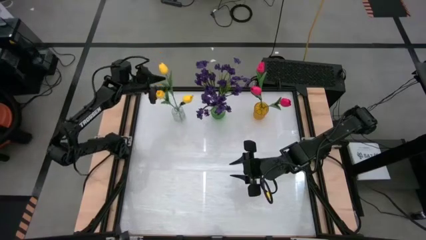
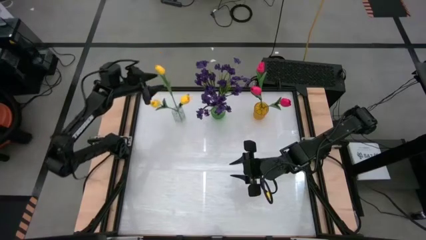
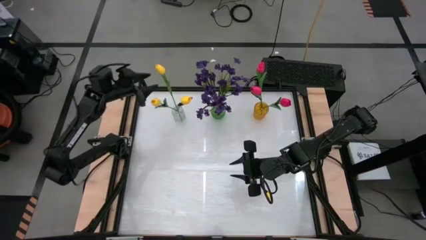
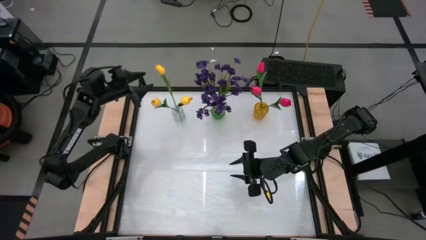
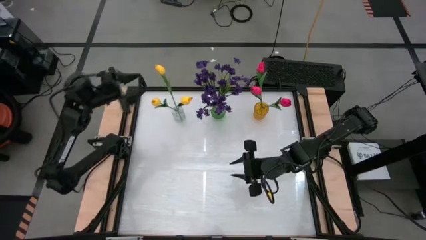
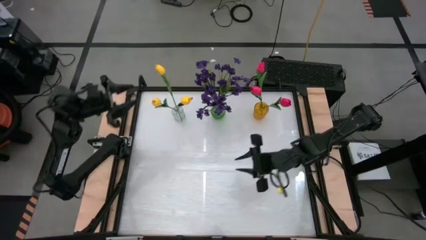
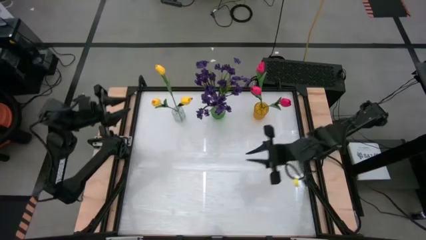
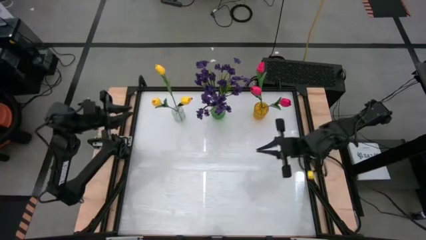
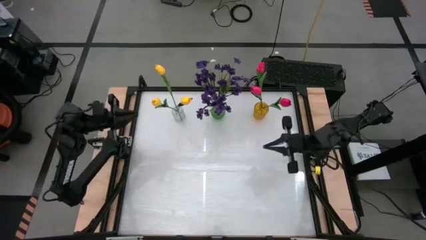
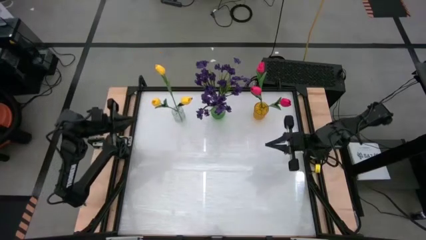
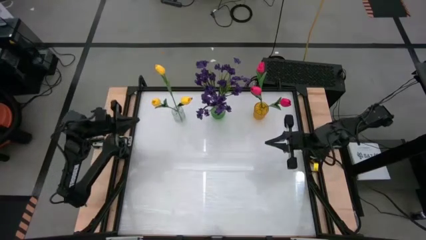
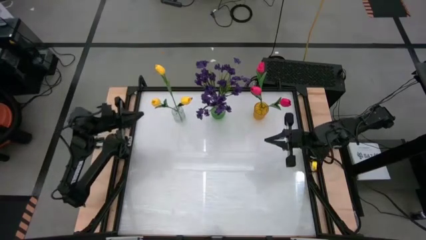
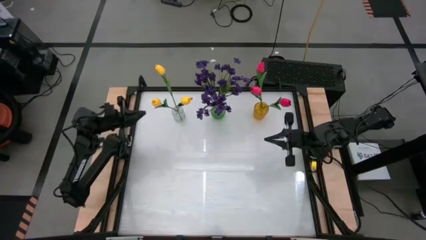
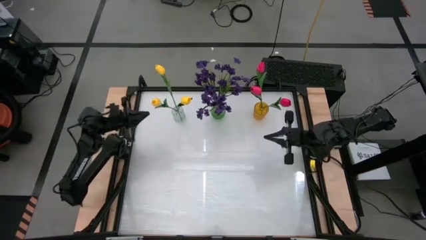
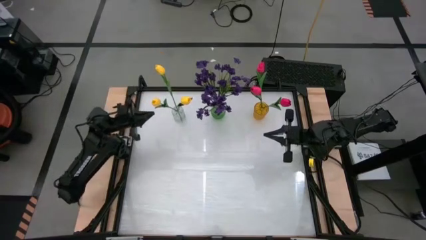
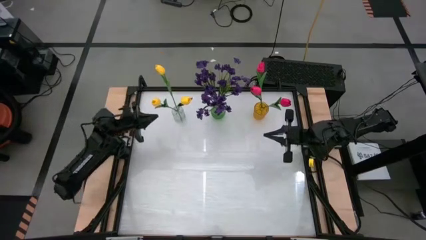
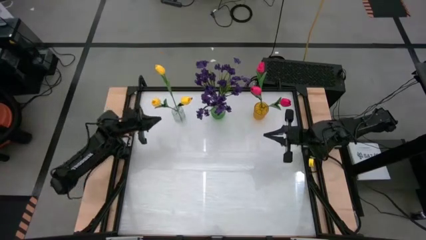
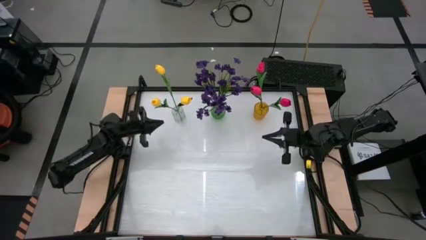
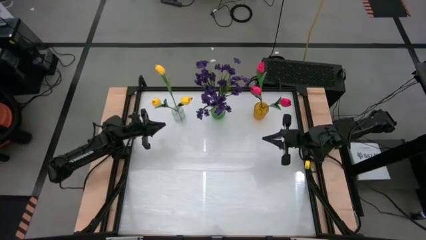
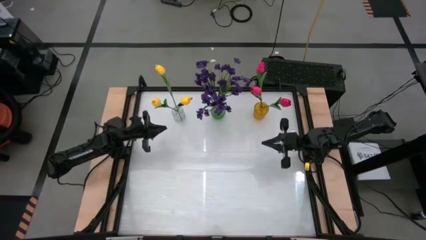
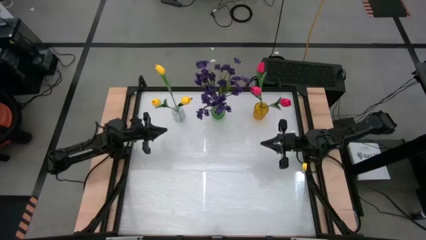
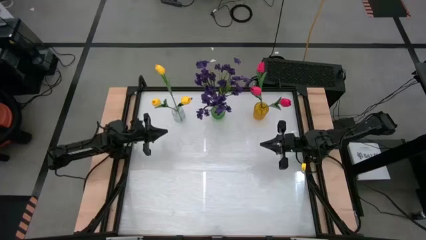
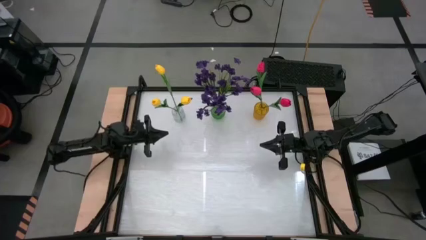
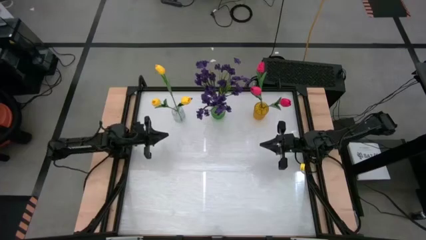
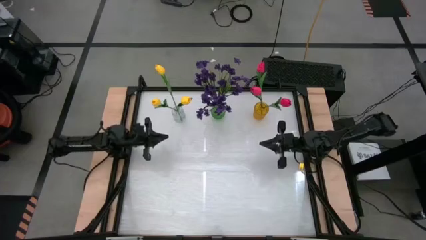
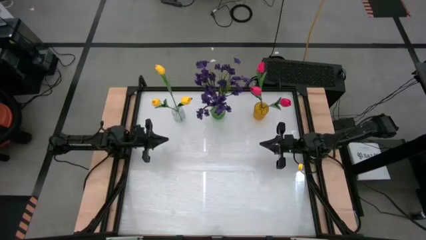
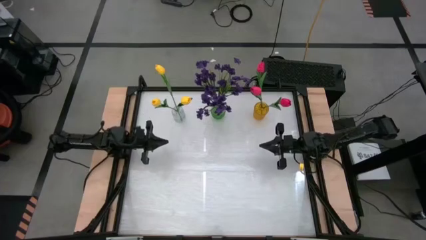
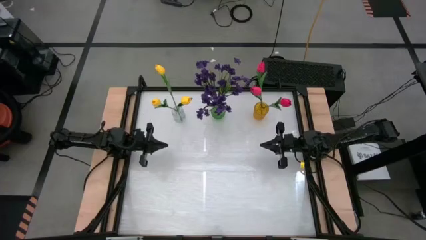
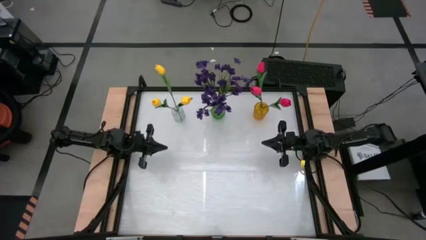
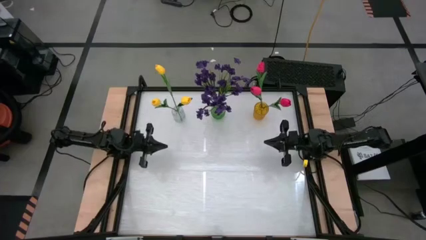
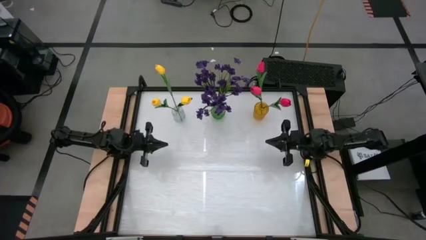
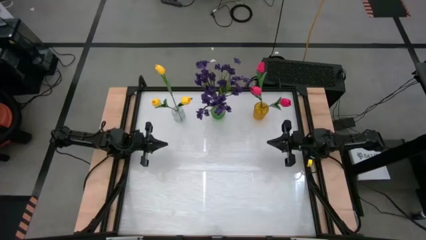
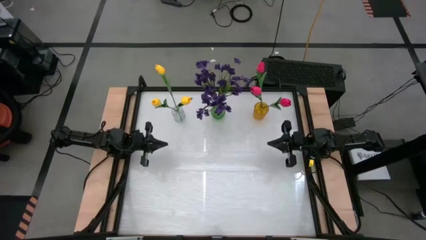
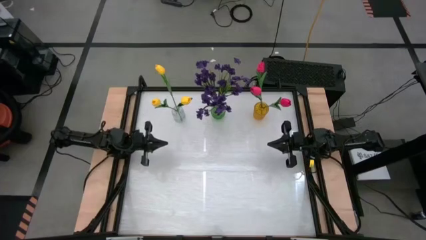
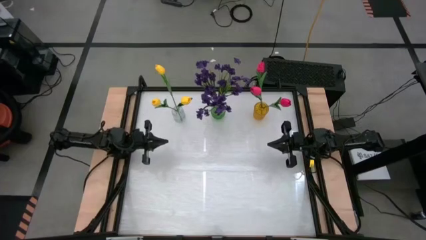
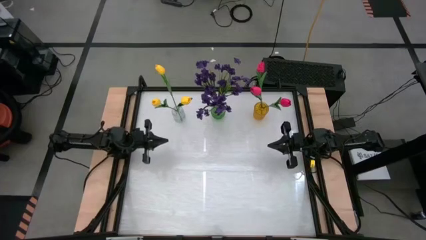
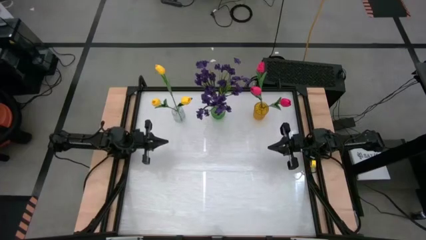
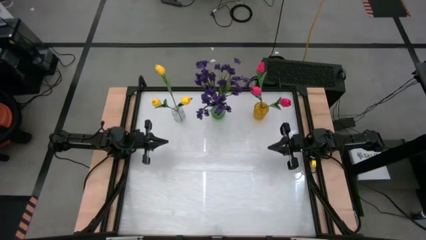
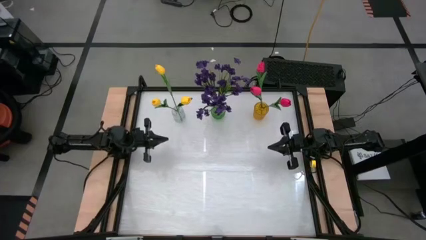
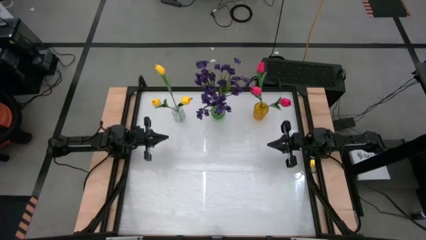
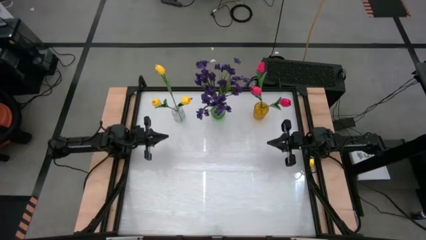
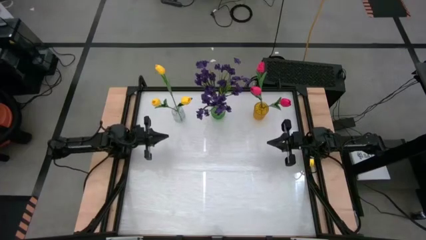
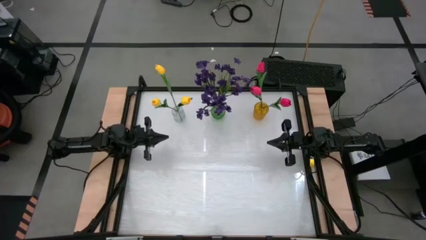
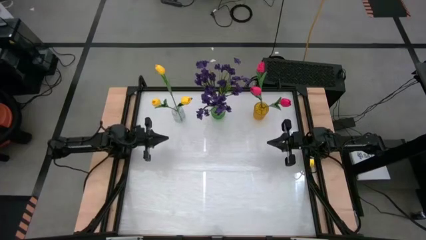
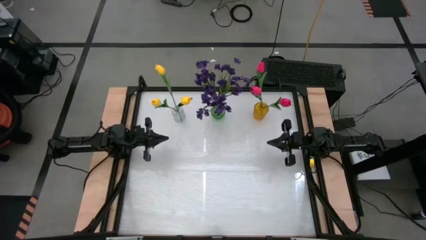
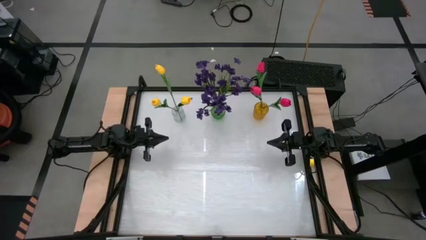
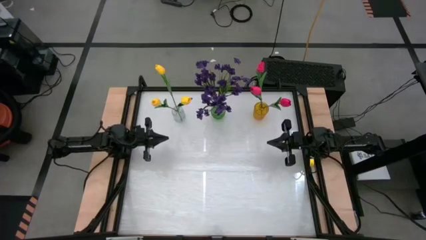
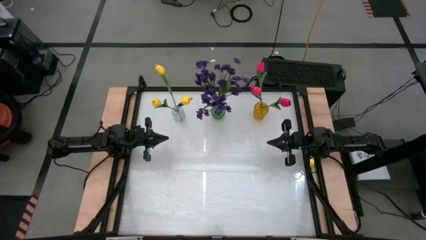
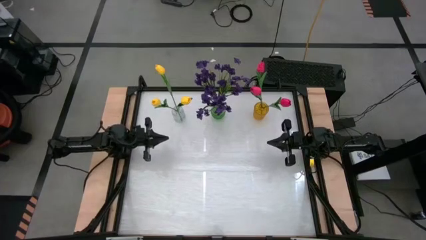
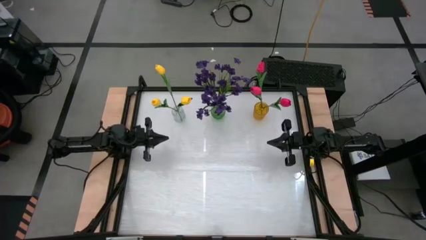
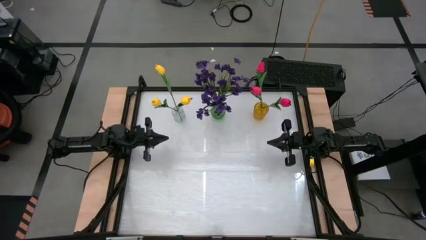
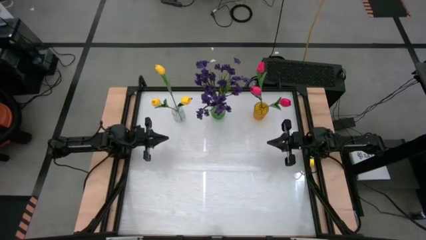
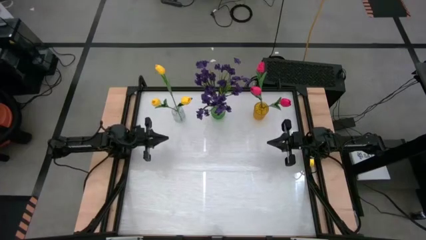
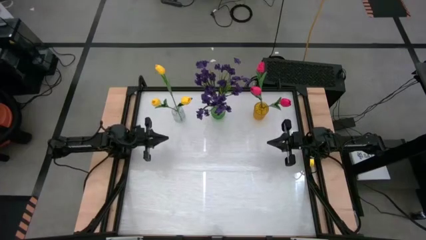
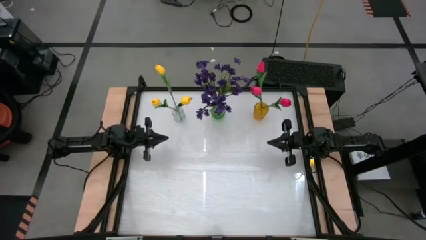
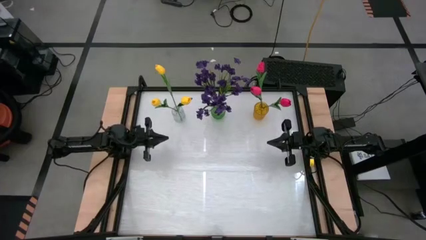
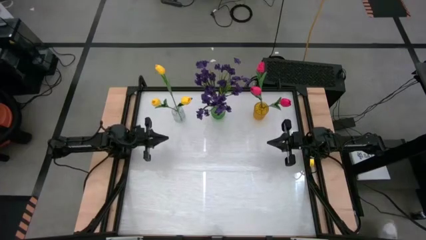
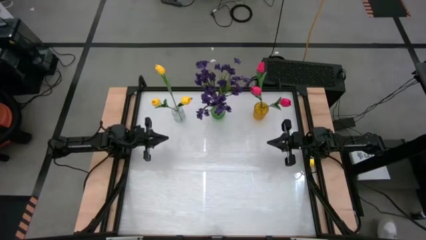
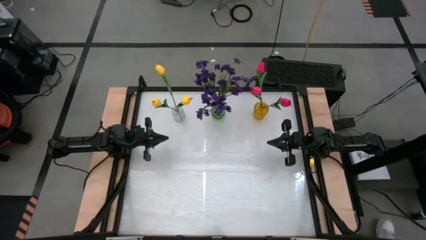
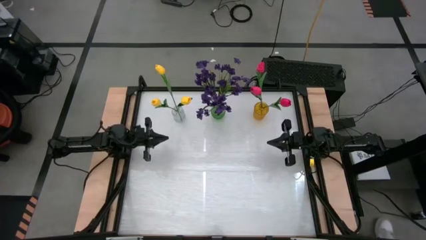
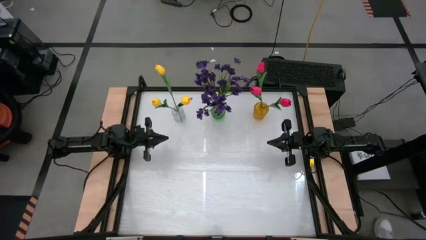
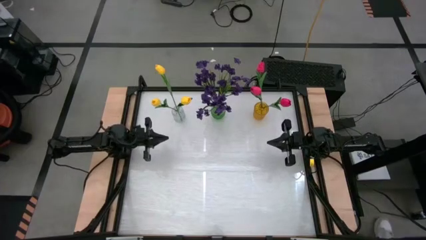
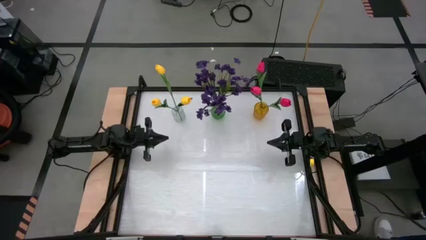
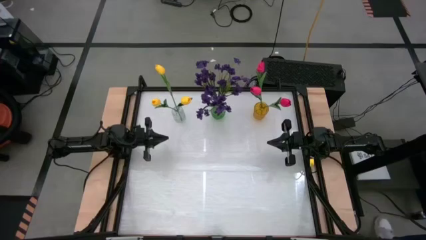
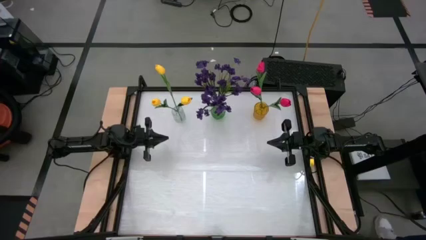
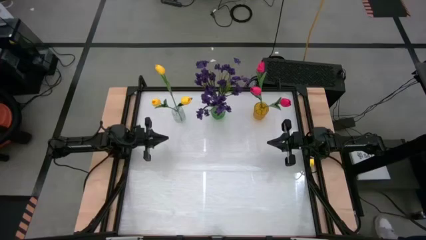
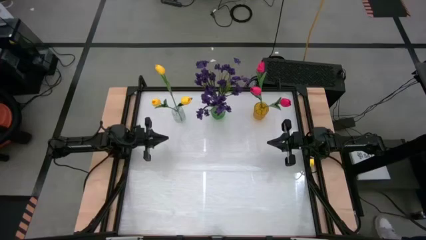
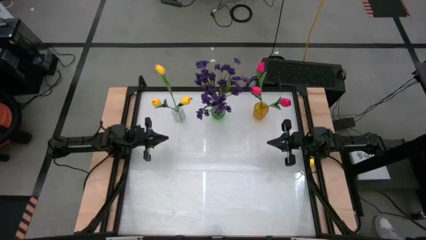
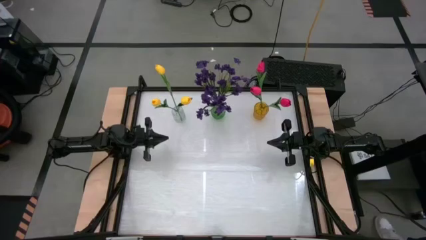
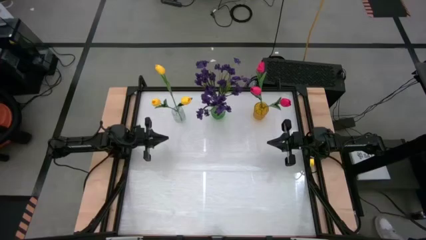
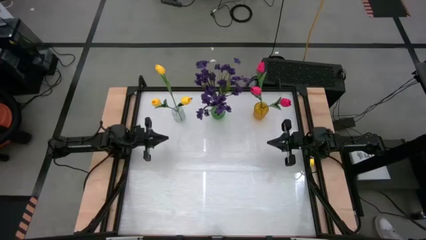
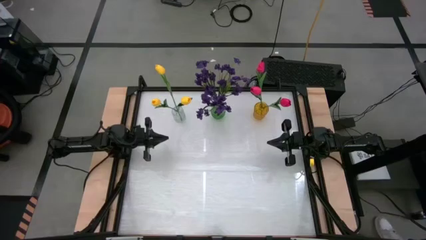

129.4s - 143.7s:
Task: Sort flowers into vase by color
Return to Home Position
